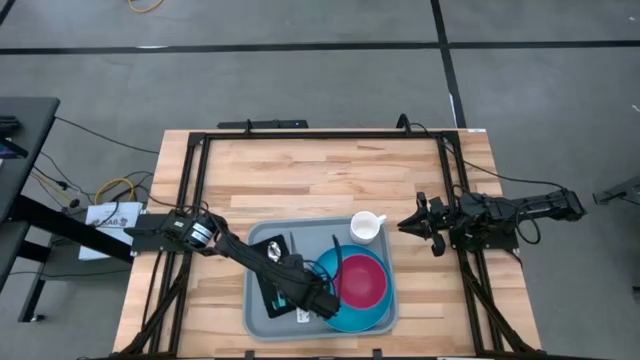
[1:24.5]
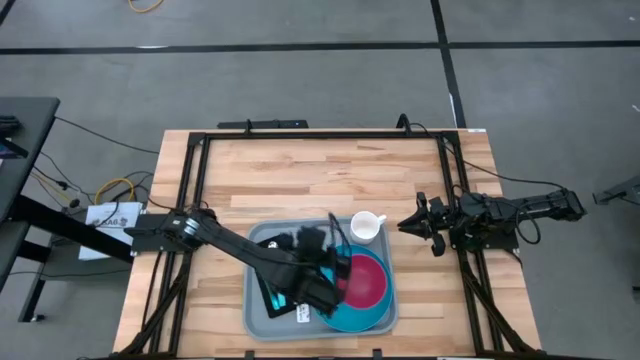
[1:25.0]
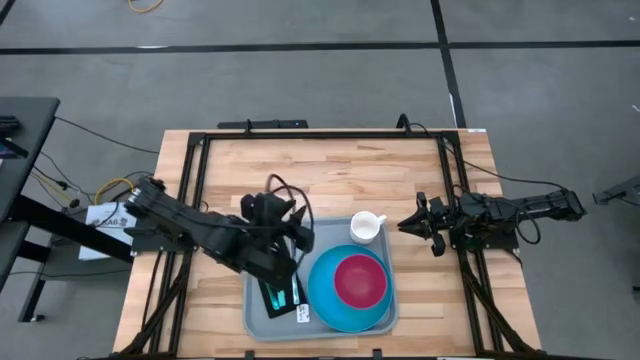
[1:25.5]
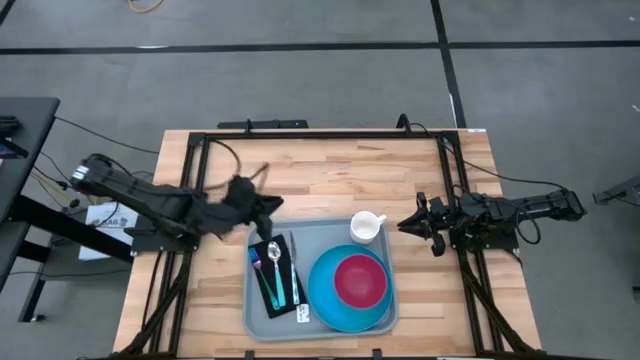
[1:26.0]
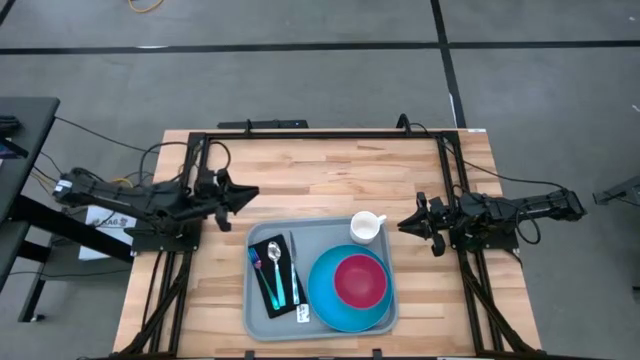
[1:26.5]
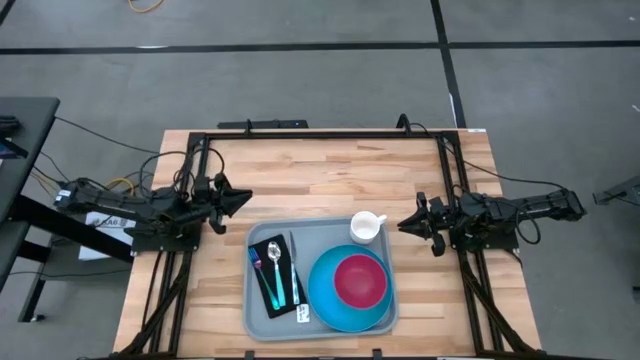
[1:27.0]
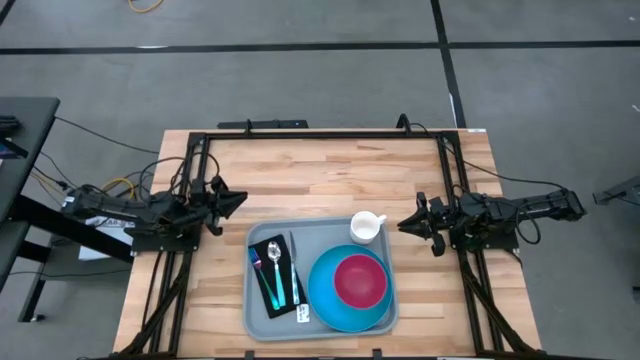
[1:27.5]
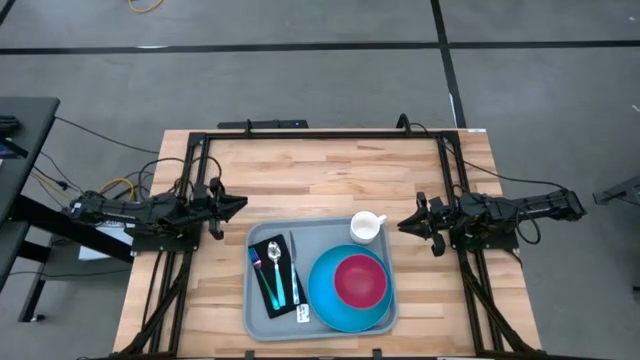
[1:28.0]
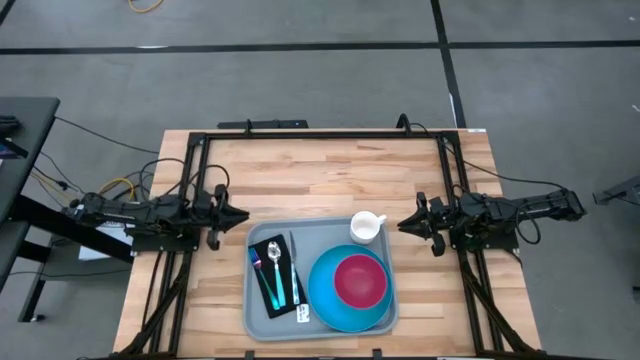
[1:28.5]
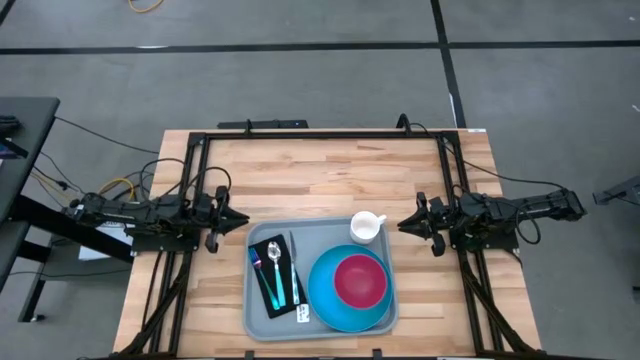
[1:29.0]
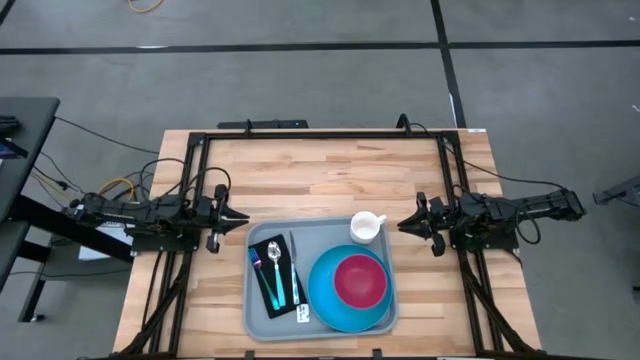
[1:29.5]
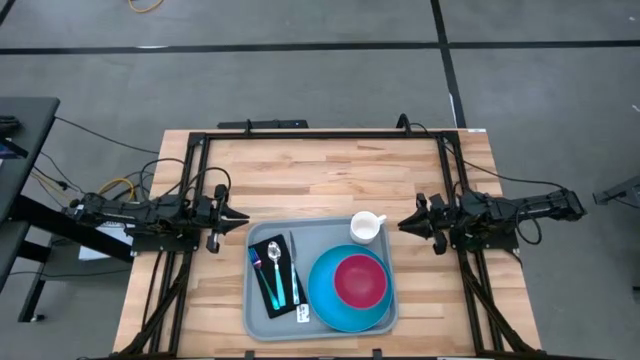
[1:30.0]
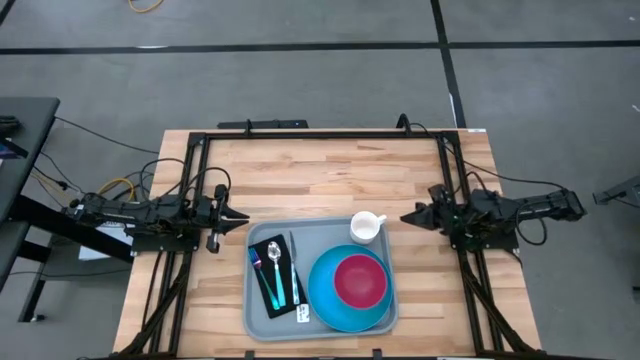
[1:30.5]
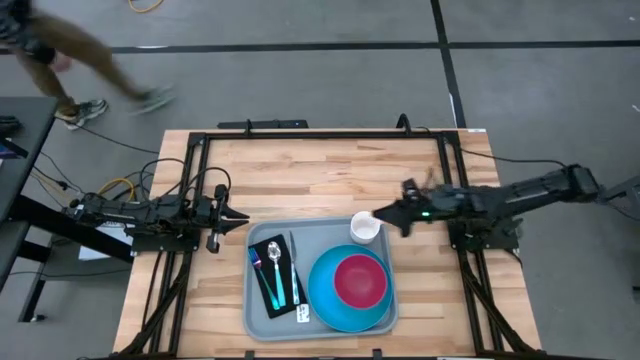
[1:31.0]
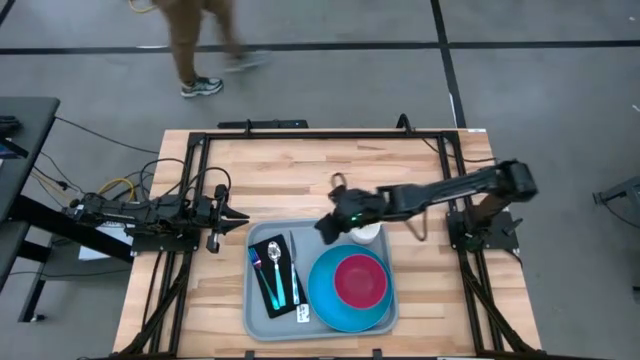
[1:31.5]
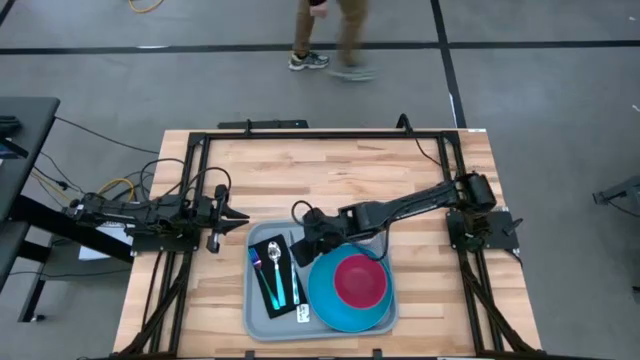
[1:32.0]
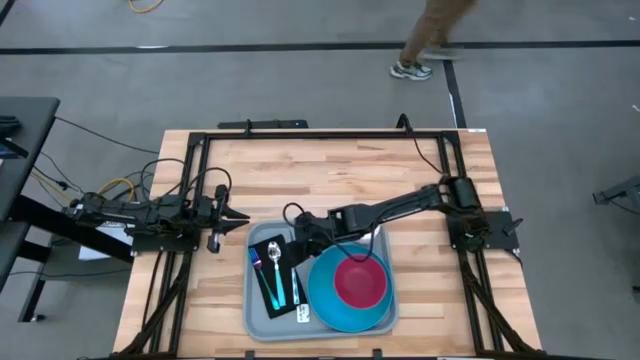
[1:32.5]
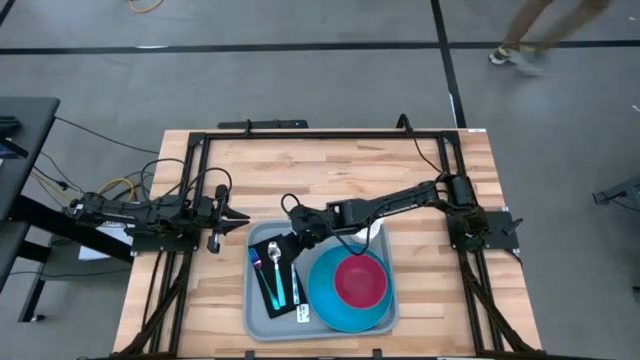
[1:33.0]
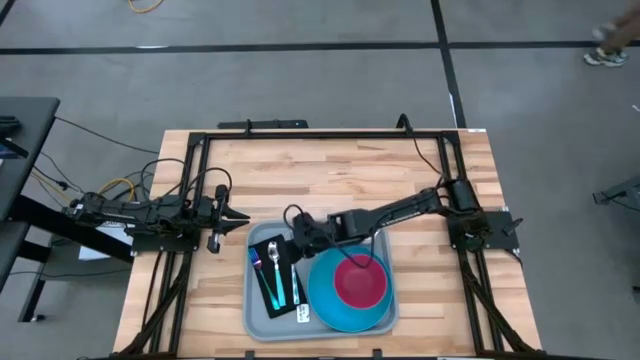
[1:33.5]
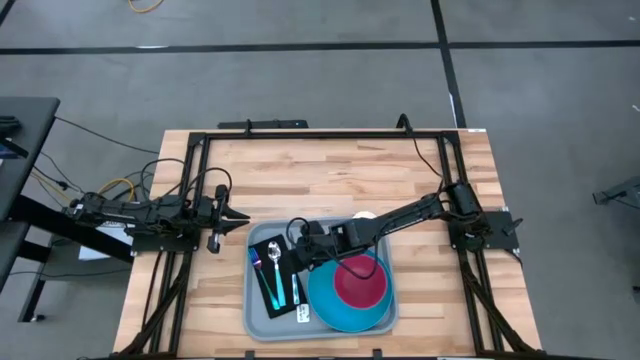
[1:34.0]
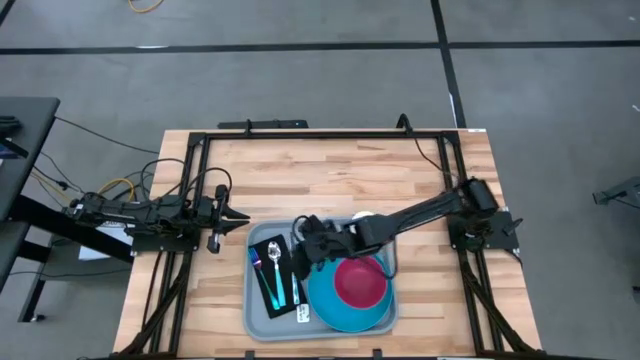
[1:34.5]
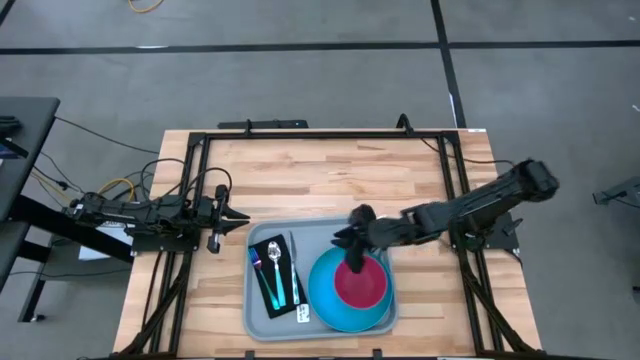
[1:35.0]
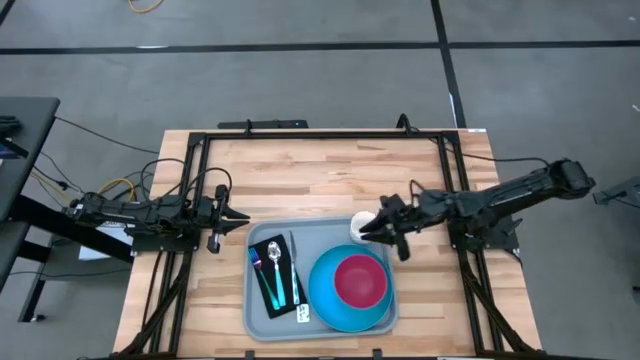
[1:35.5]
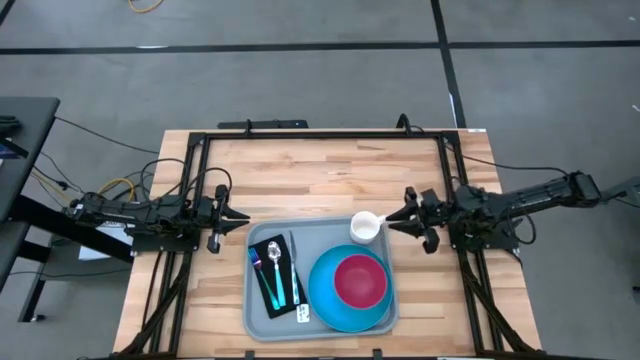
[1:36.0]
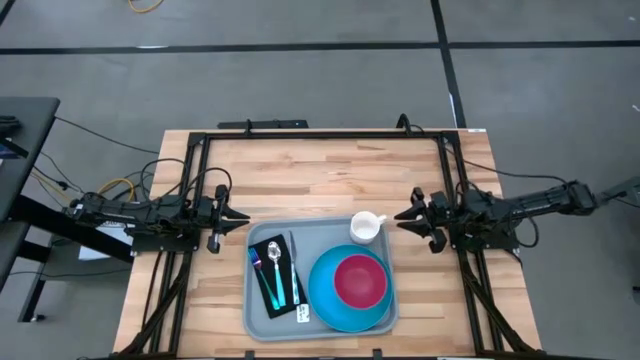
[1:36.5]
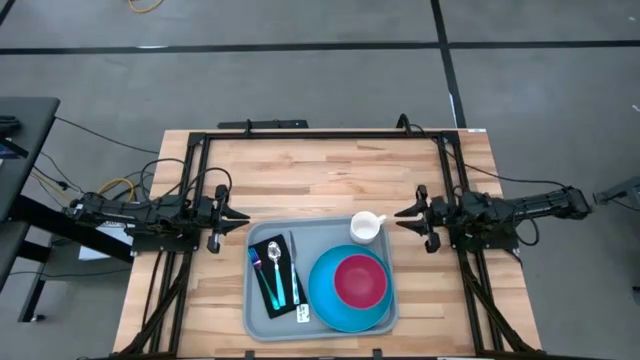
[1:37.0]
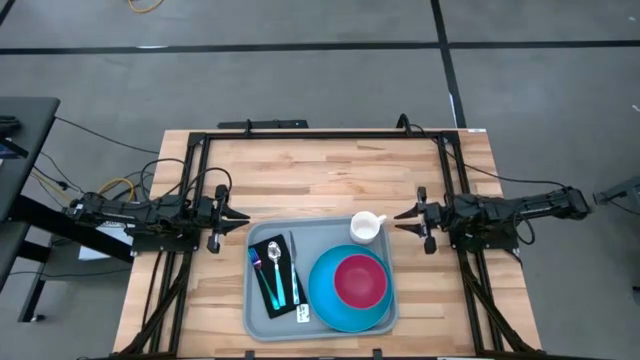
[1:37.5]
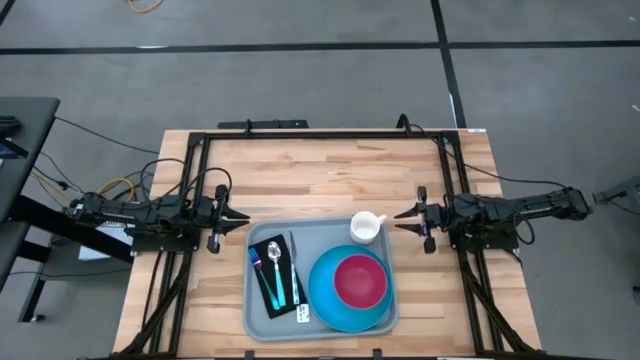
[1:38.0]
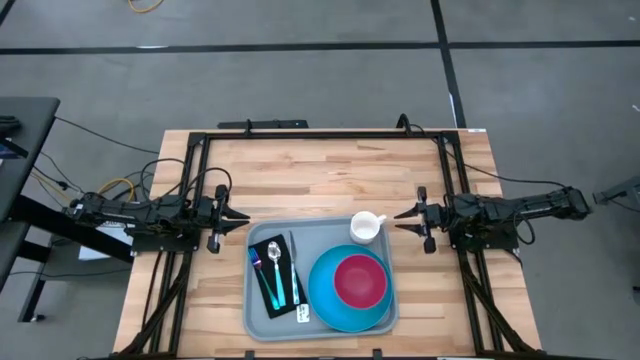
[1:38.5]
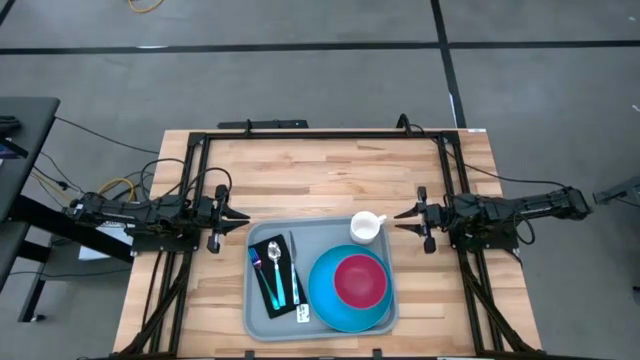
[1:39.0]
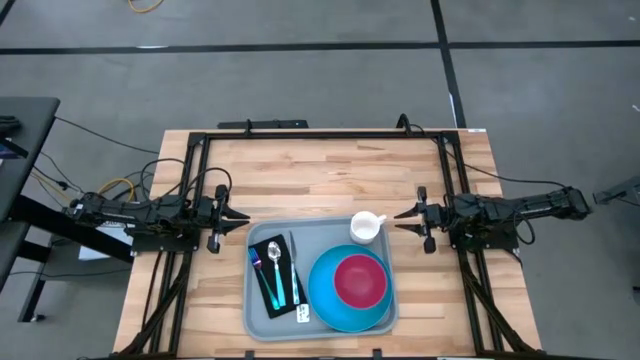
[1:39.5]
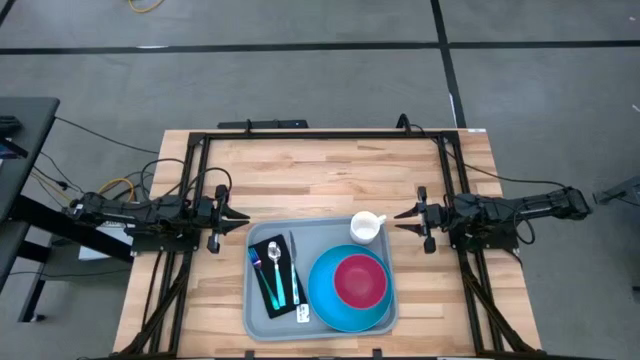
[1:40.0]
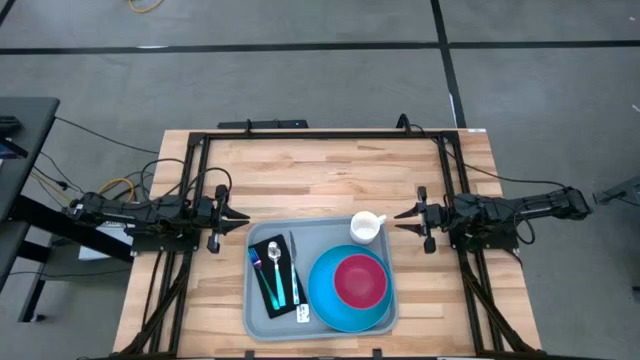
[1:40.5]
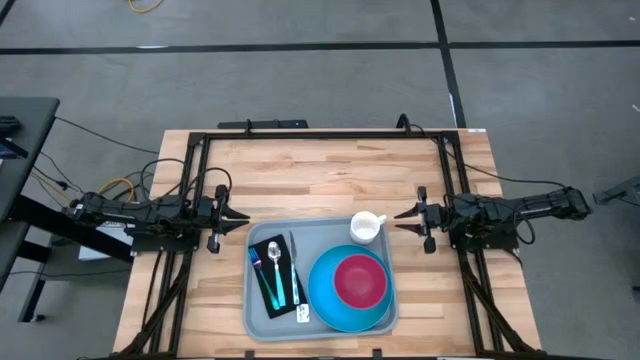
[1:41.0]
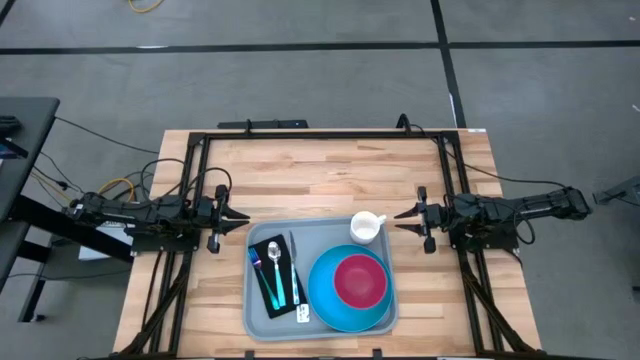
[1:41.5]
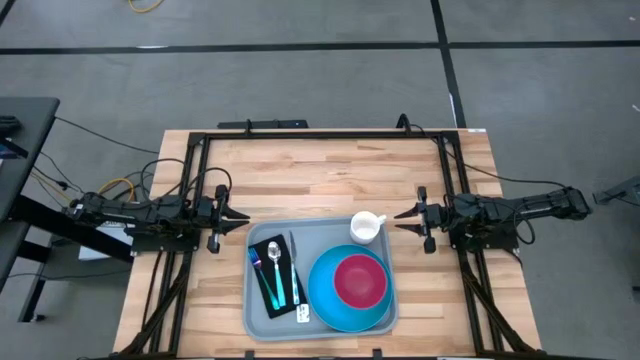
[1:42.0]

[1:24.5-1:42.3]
Task: Set up tray
Return to home position

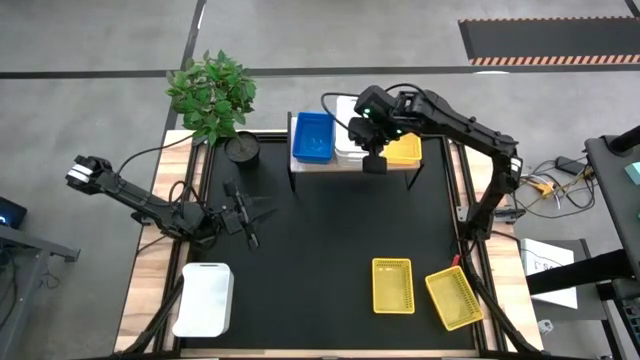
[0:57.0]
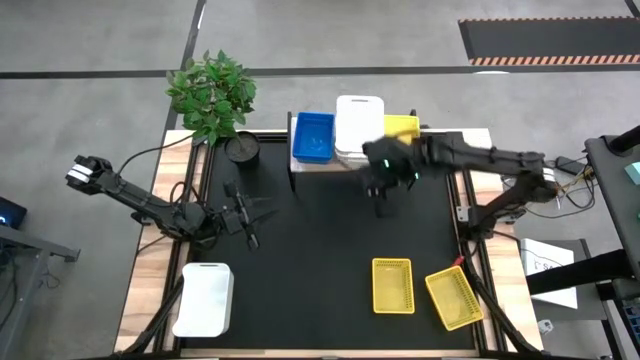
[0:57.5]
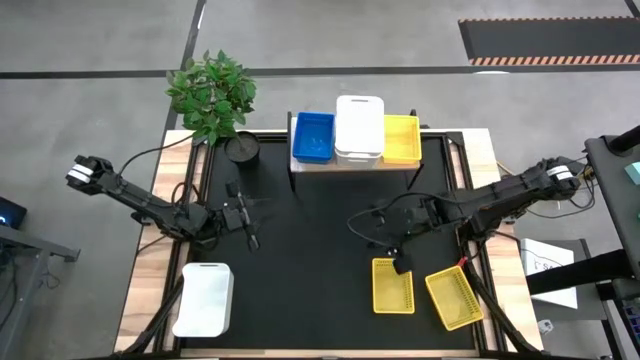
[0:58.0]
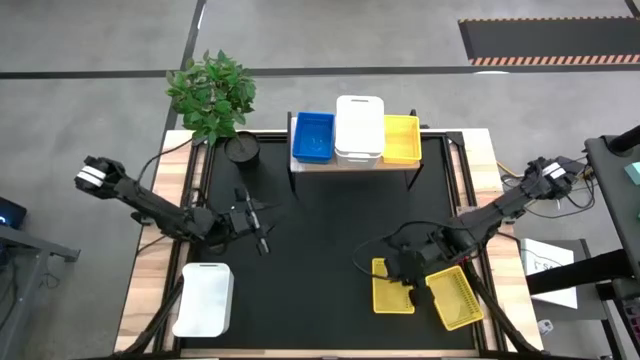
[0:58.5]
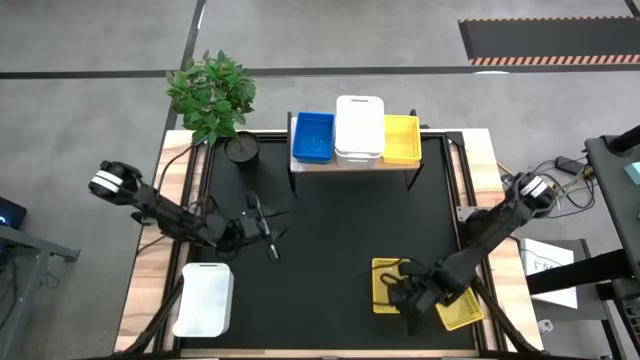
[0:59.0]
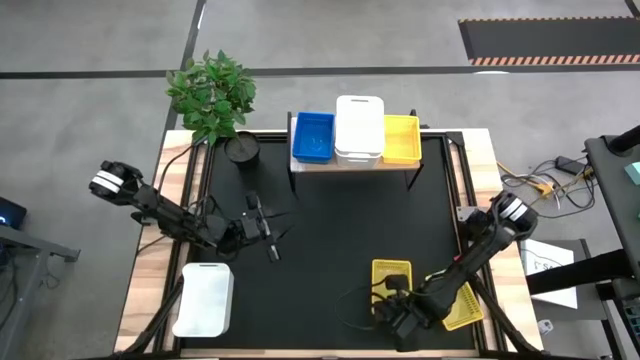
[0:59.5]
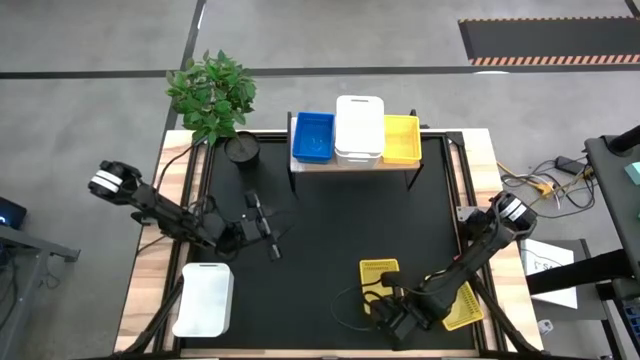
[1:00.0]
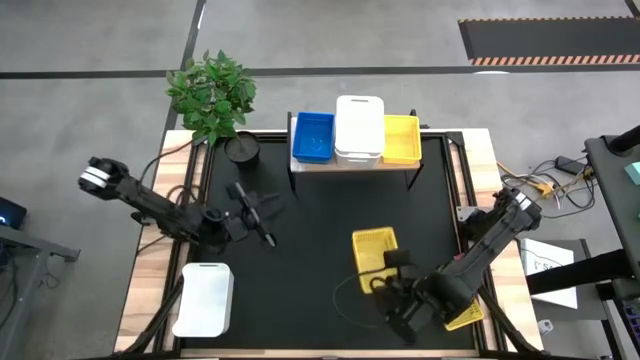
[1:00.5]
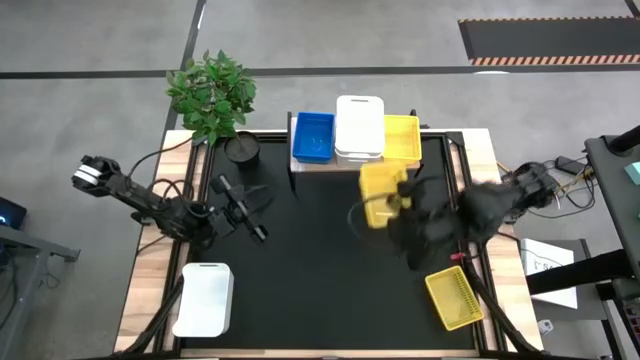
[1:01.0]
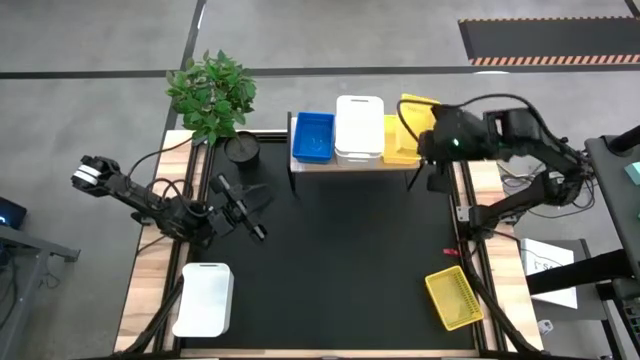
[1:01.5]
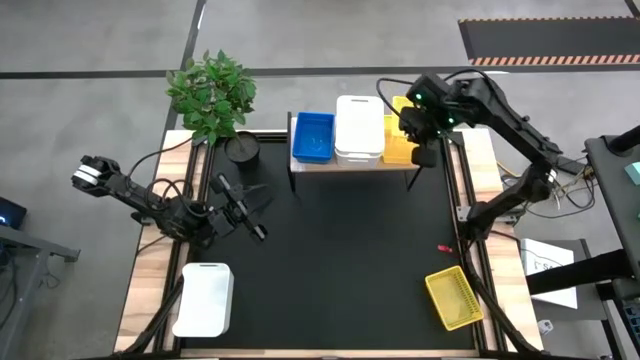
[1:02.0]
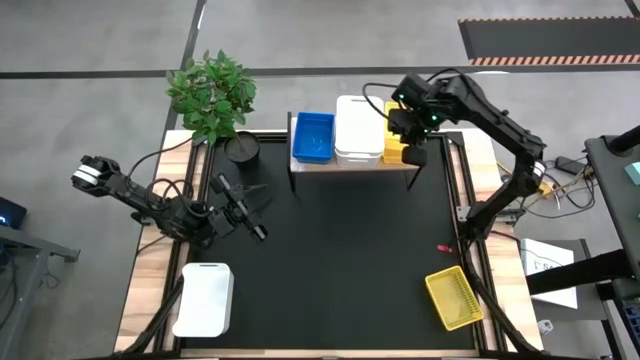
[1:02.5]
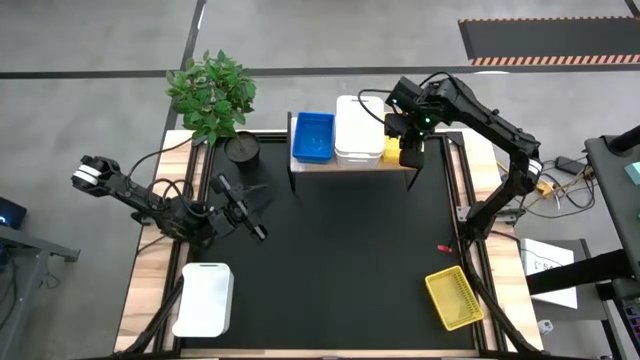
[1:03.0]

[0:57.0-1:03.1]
Task: Stack baskets on shelf by color
Stack the left yellow bin on the other yellow bin on the shelf
